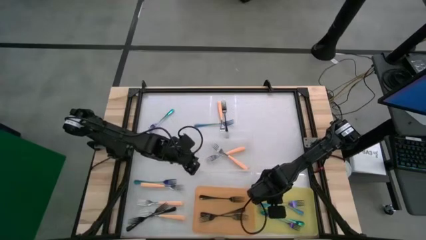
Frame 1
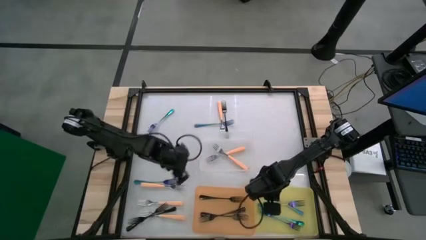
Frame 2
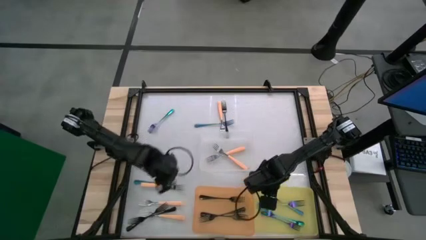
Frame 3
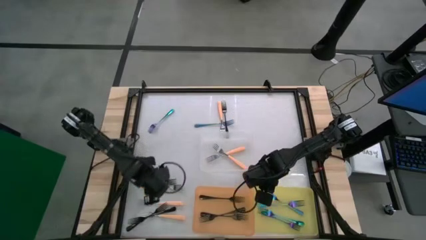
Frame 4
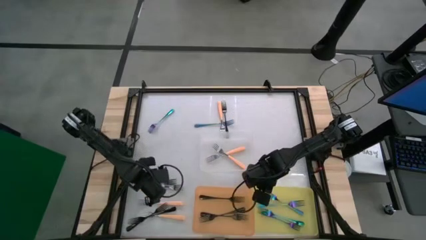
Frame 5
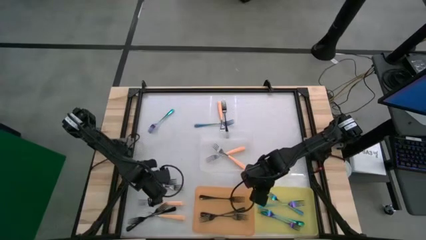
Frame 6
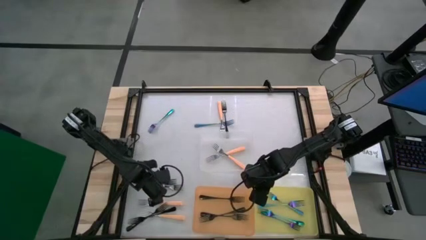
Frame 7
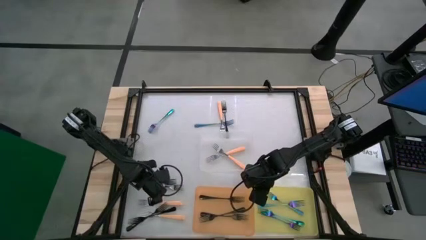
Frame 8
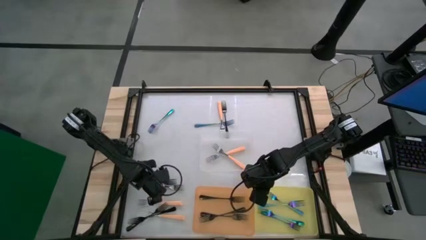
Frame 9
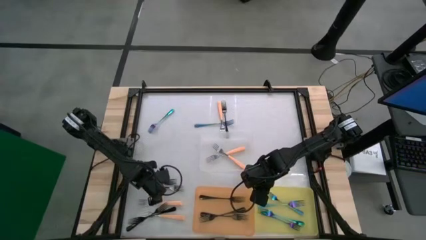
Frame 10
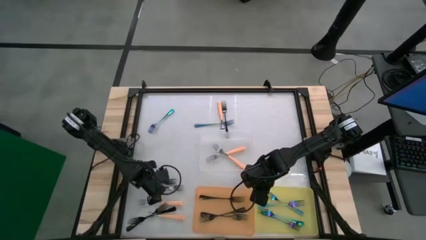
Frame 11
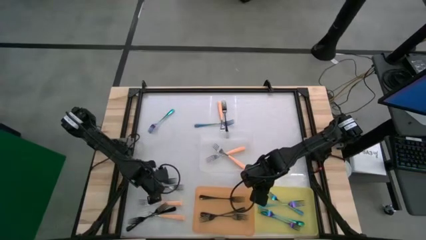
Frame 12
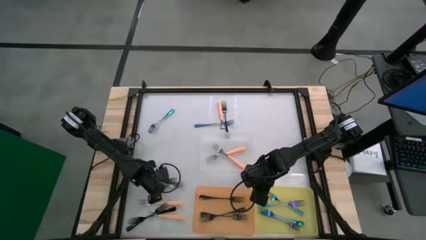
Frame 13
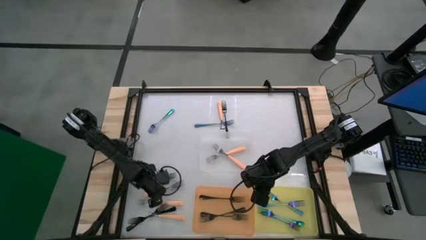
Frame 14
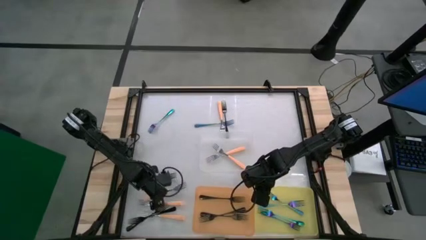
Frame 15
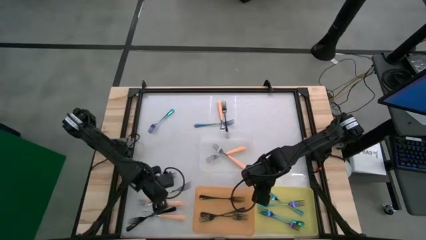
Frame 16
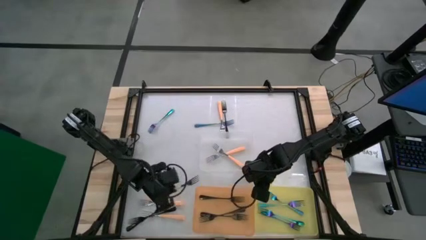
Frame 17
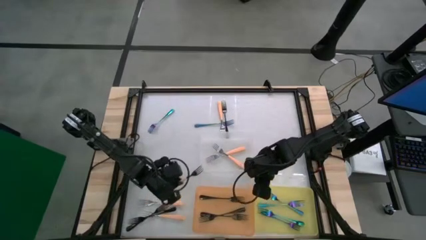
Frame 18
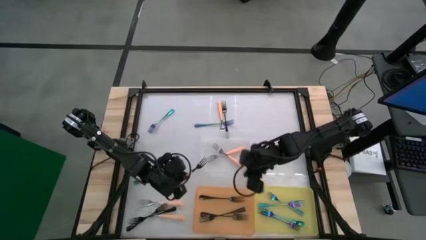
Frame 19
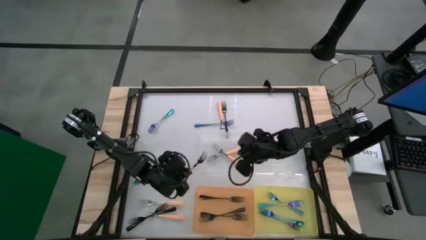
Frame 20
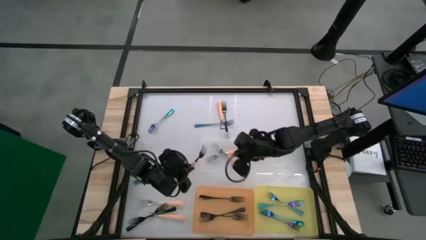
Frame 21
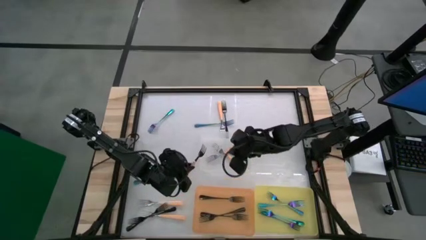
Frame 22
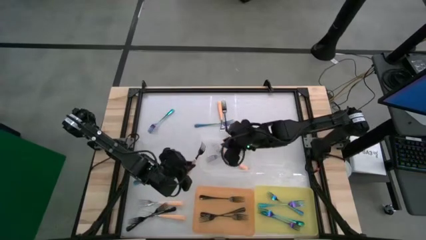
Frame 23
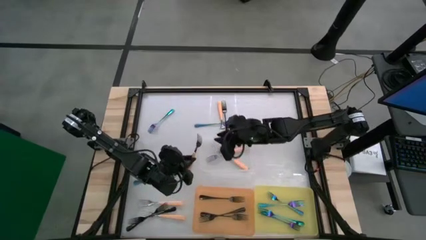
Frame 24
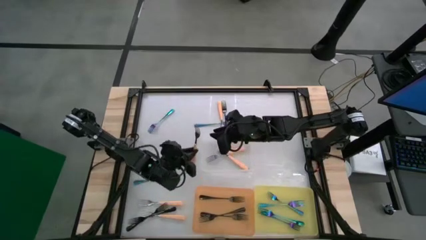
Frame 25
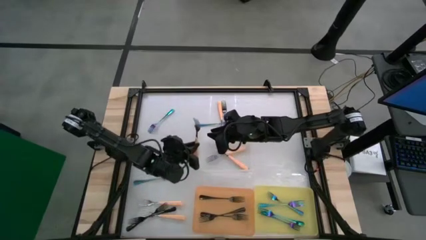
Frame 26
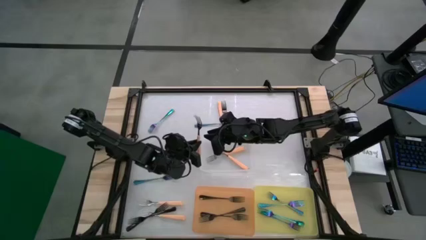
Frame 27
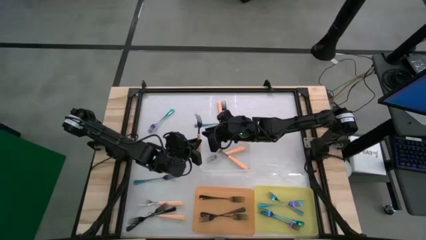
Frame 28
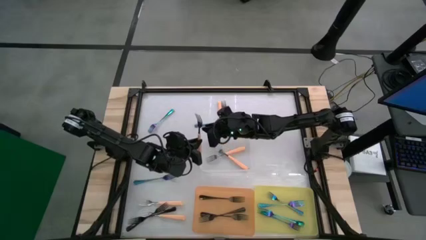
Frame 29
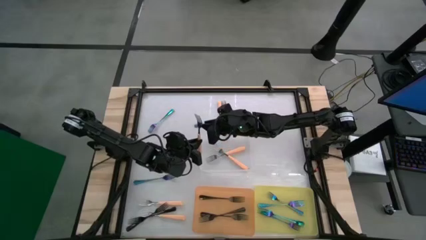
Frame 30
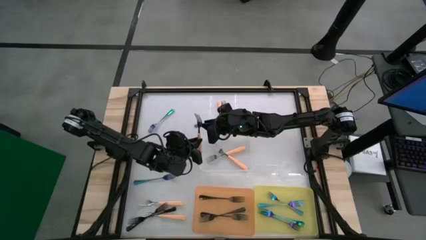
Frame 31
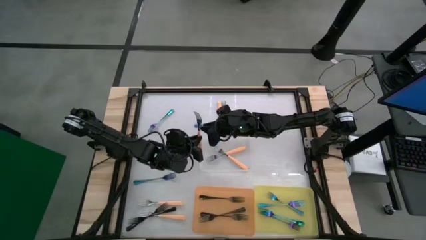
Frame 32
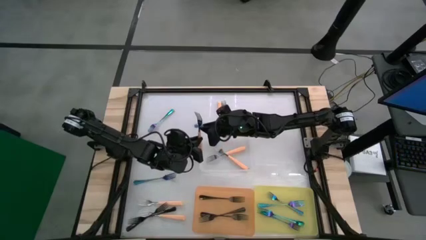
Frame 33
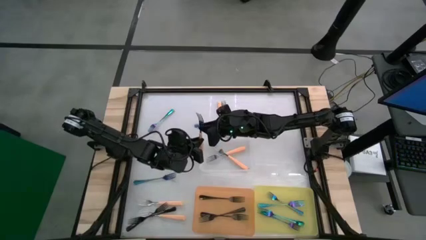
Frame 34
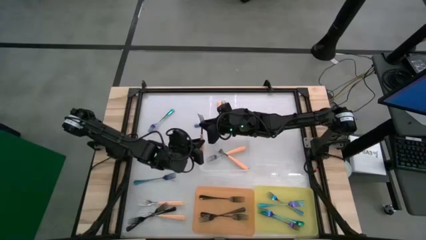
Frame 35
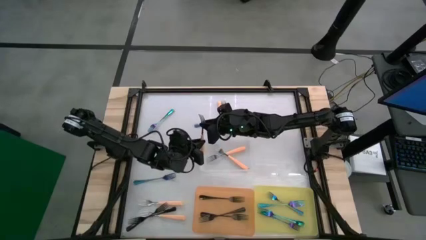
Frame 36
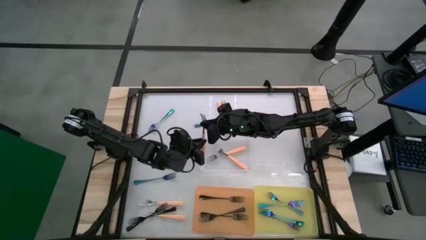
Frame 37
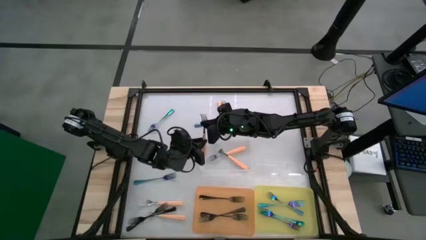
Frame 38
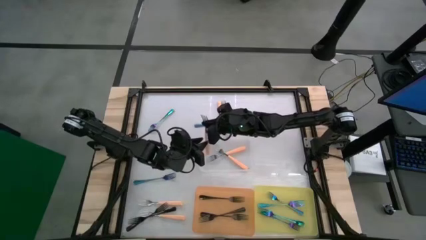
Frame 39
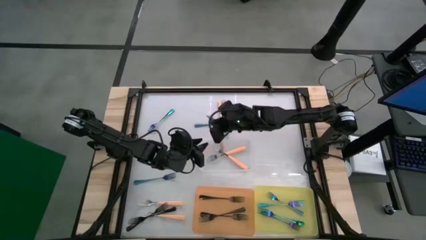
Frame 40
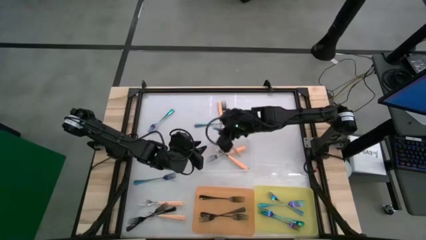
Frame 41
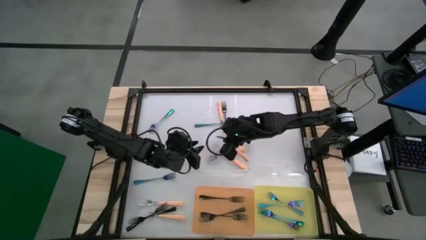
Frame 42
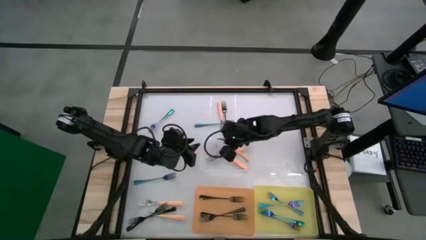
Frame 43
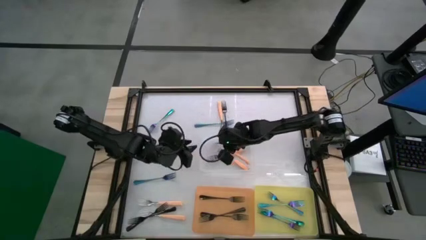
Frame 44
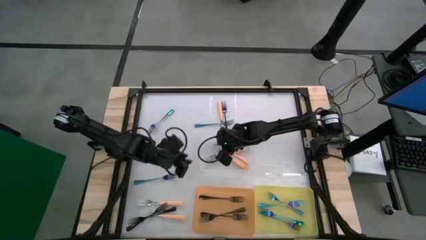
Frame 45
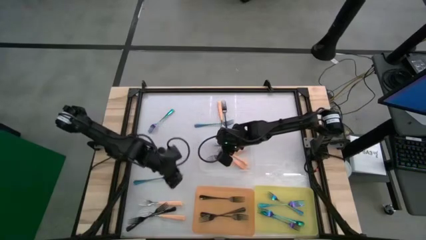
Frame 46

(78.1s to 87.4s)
Task: Sort silverware by color (type)
Put the orange fork into the transparent bin

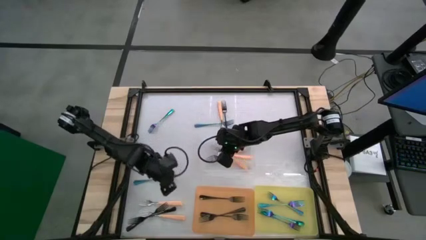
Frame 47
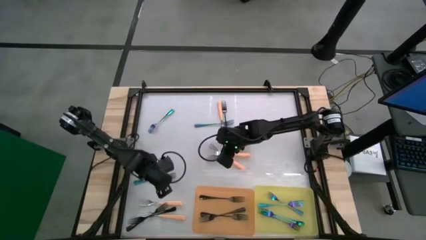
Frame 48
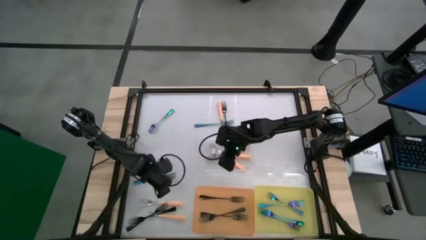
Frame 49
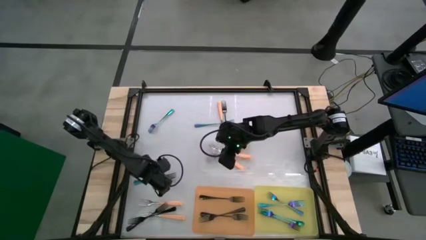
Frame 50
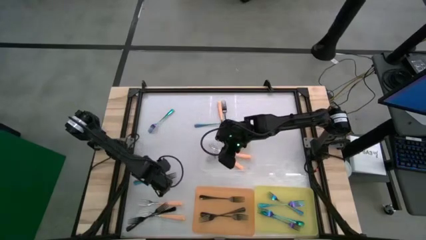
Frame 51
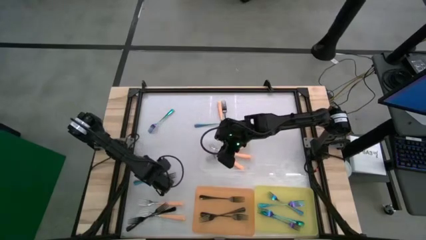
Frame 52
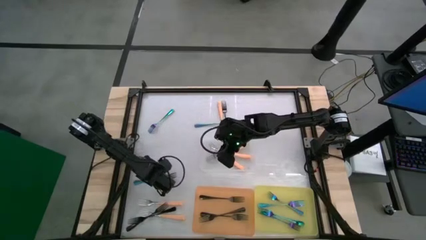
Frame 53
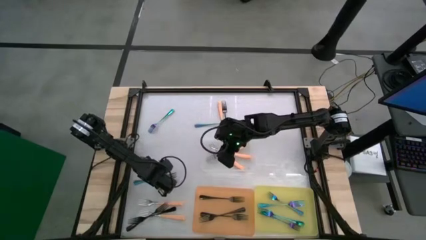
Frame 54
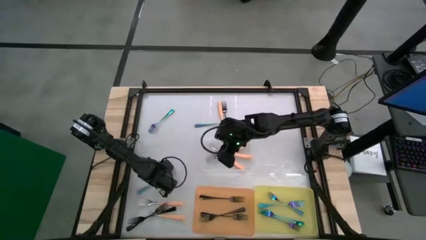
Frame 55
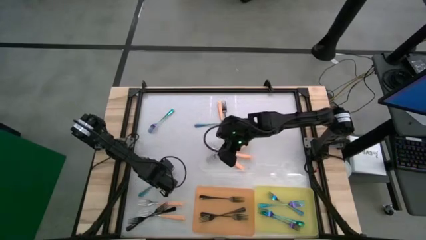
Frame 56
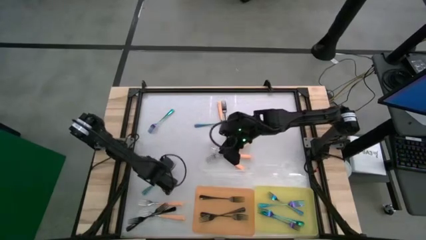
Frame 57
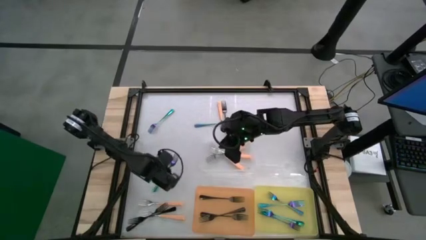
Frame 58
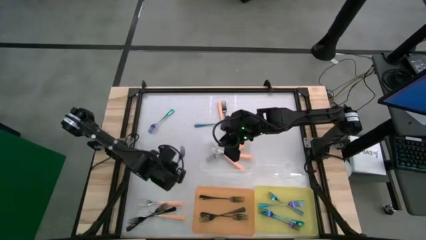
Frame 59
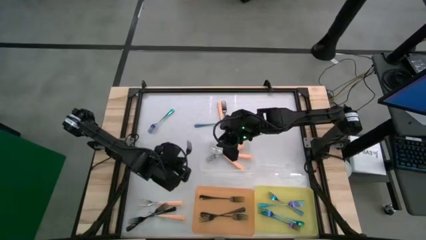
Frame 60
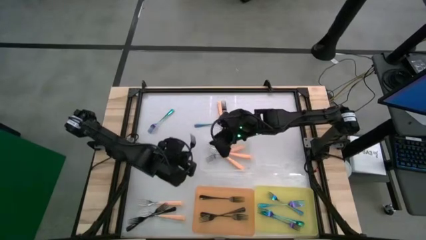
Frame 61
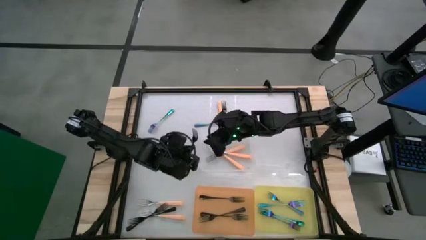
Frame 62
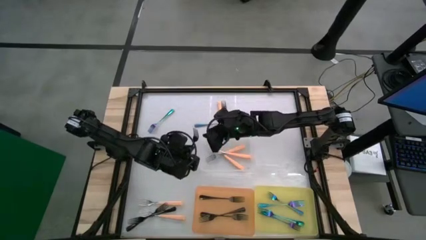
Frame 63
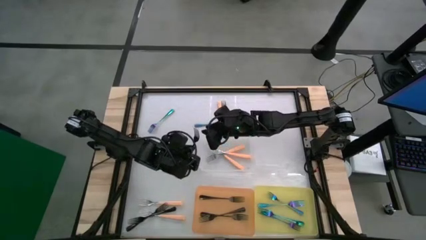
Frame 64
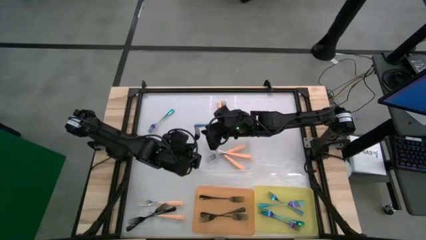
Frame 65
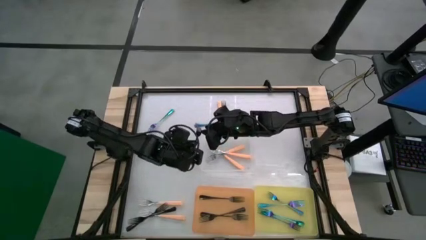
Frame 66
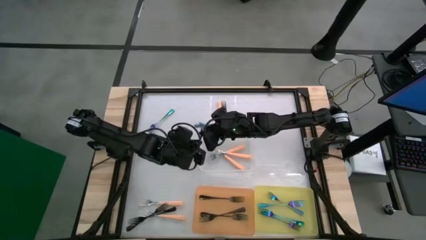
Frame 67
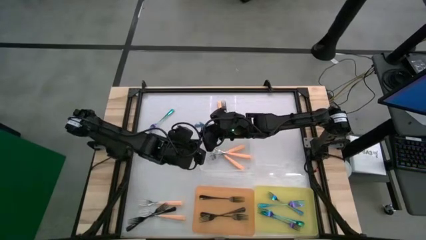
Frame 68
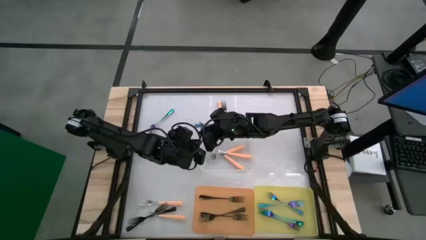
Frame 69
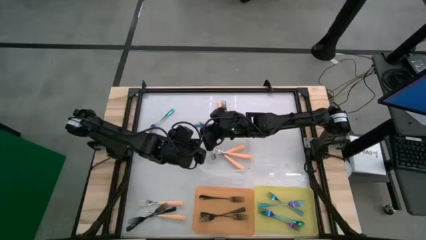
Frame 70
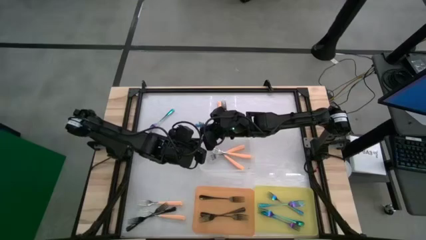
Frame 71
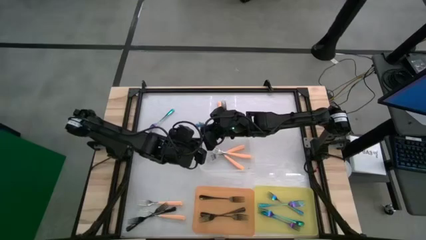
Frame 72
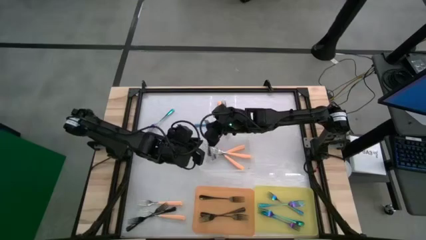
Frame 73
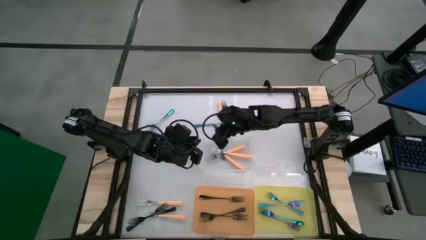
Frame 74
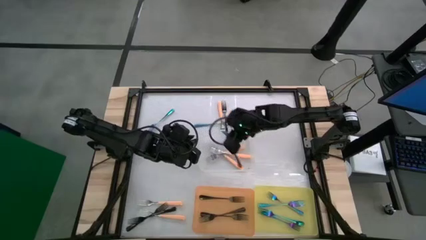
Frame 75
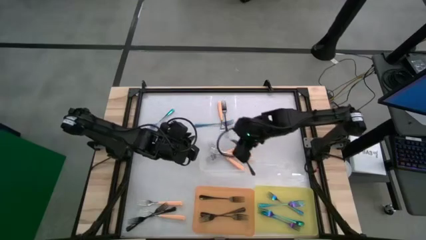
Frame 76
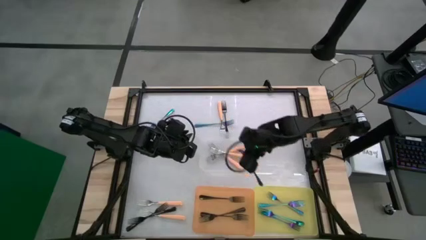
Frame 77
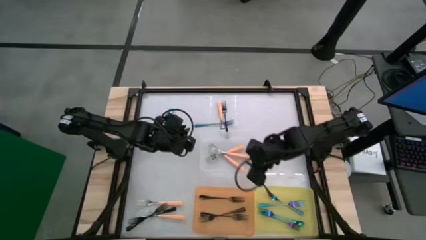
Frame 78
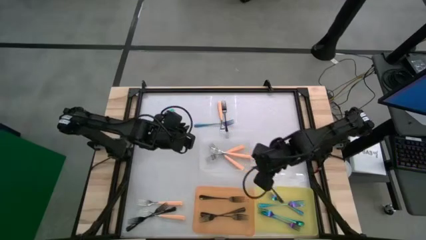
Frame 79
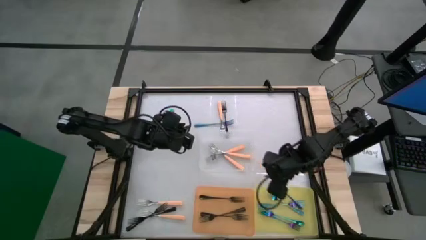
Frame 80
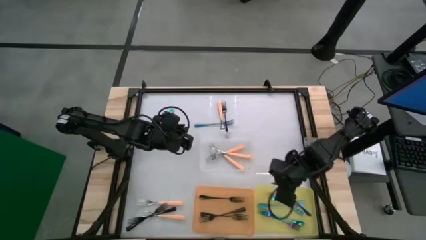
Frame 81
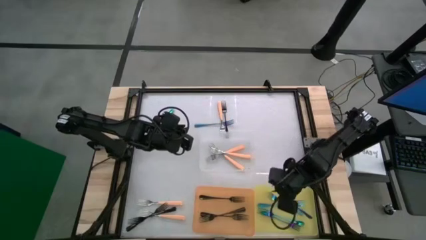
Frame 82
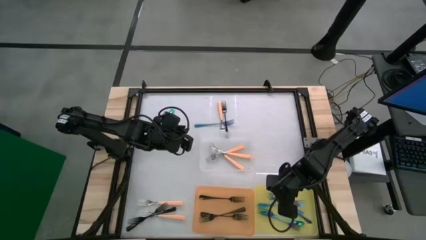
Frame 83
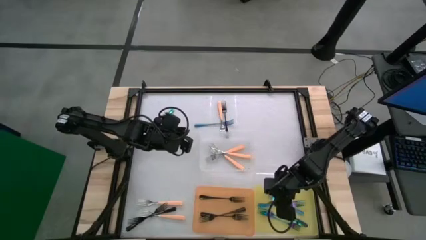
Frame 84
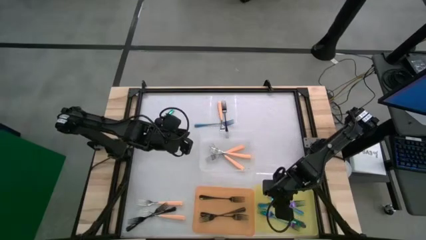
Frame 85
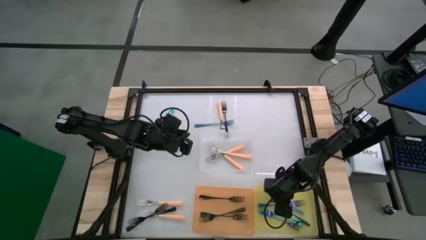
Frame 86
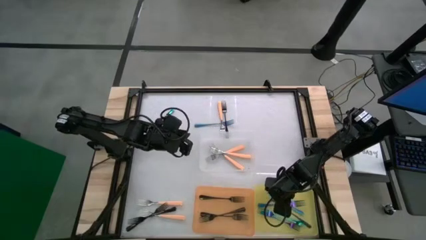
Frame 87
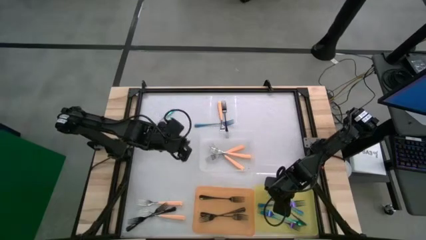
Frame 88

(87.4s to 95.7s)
Put the blue fork into the yellow bin
